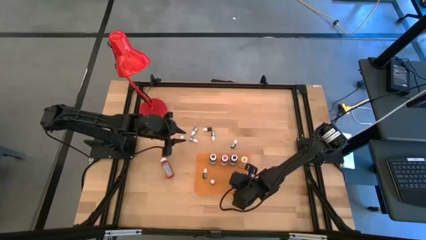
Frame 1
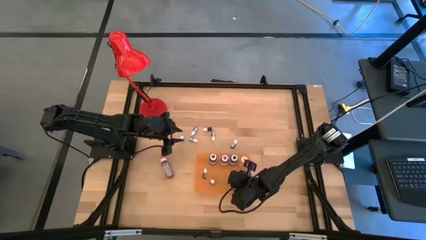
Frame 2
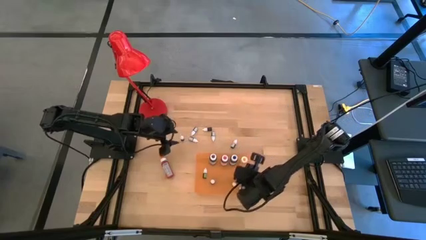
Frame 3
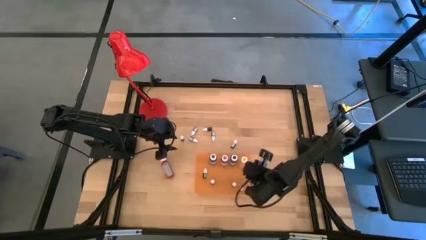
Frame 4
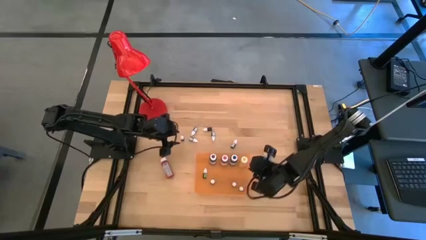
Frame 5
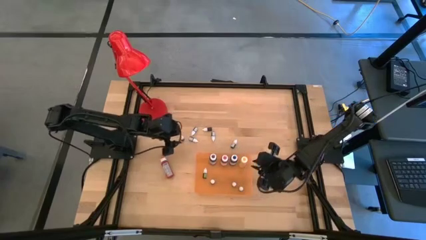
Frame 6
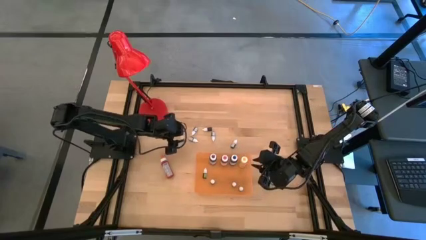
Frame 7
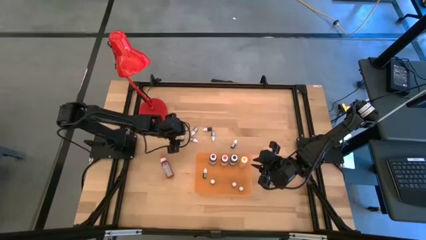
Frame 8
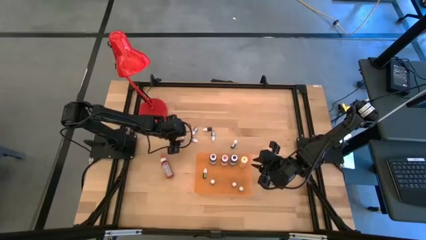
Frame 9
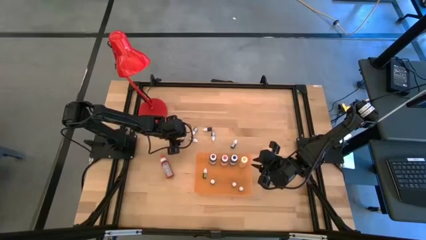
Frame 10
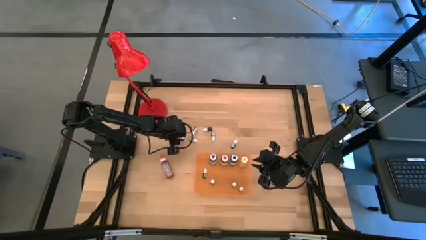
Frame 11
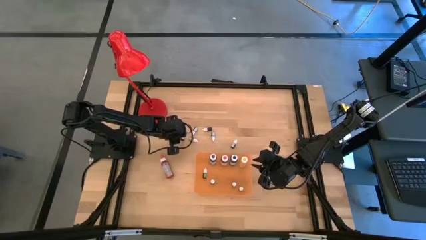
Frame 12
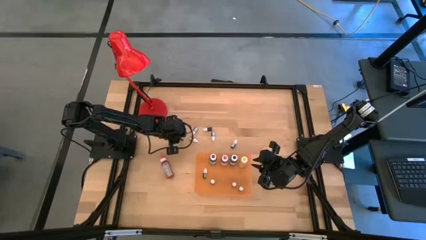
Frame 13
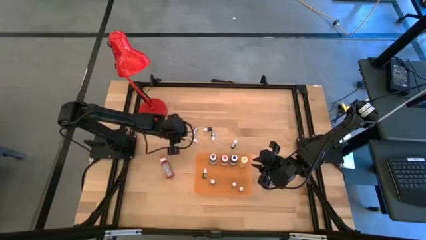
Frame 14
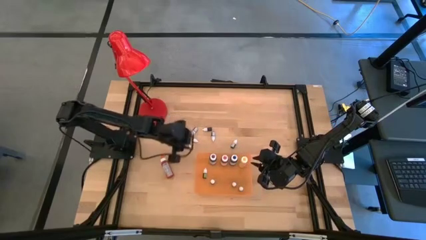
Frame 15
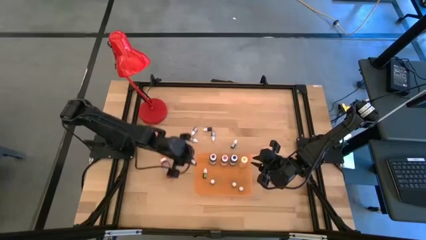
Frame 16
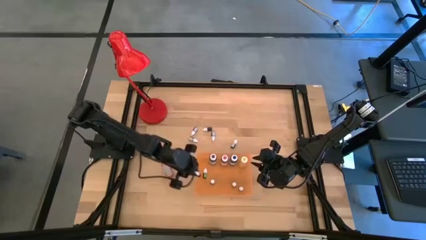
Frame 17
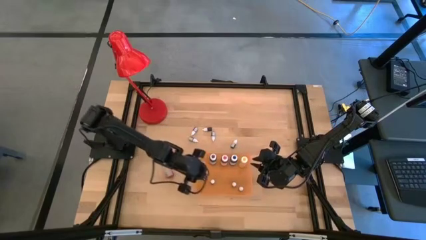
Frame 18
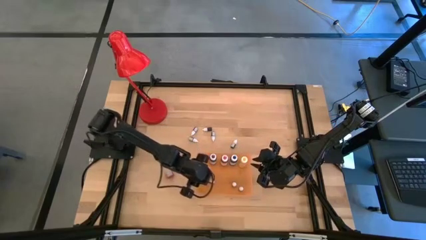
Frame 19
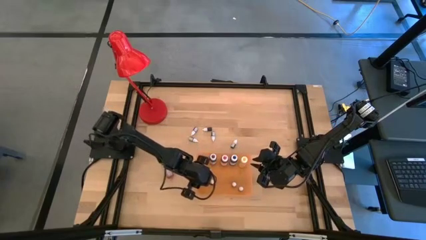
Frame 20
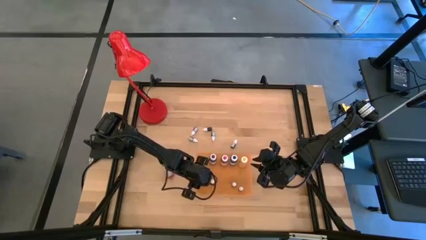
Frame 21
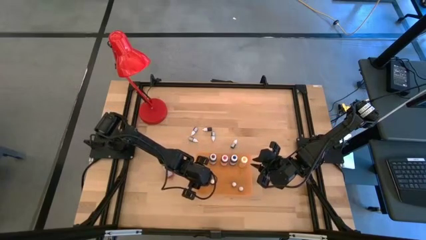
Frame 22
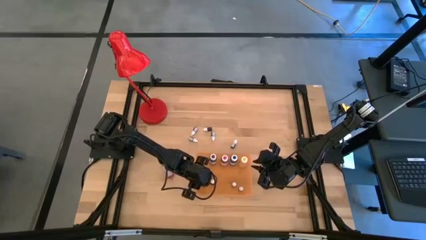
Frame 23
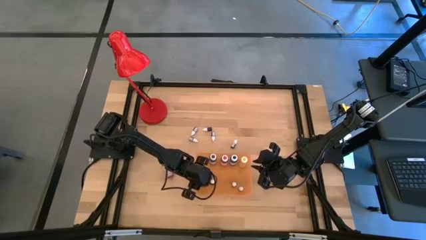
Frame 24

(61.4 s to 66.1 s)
Task: Pick & Place food coloring
Put the left small red food coloring bottle into the orange bin

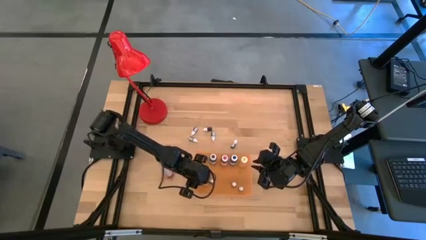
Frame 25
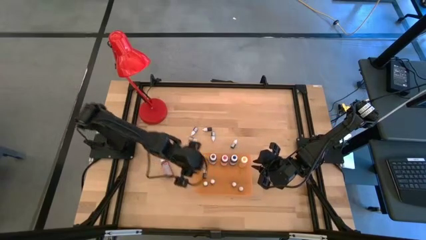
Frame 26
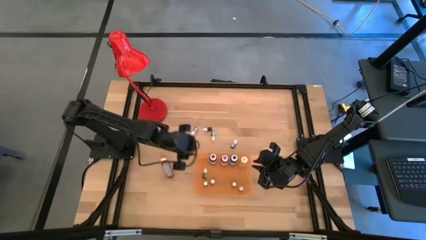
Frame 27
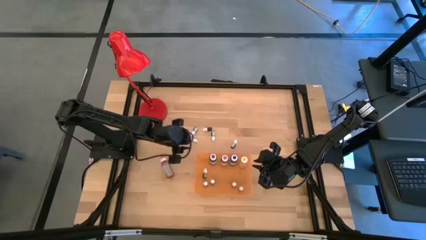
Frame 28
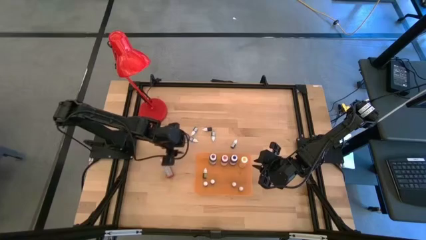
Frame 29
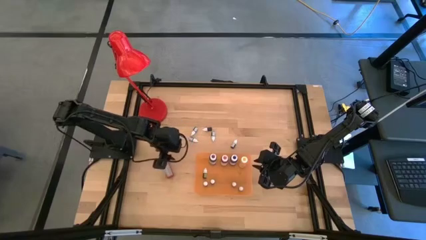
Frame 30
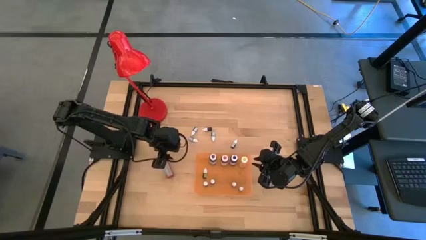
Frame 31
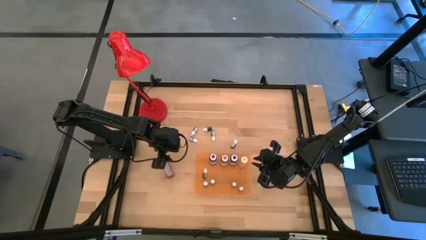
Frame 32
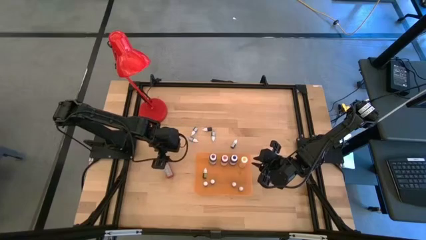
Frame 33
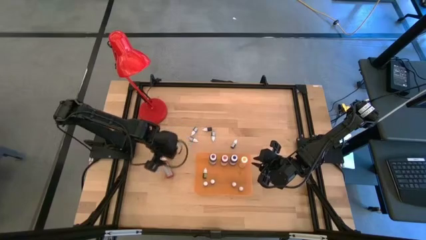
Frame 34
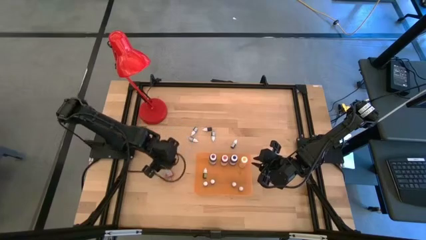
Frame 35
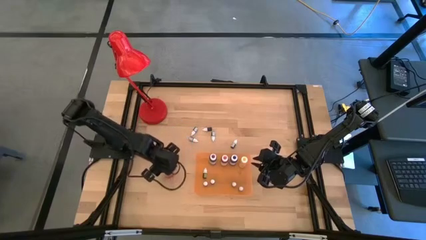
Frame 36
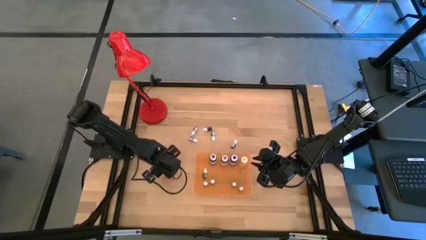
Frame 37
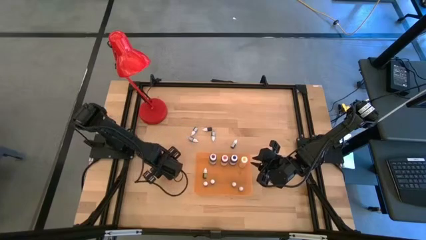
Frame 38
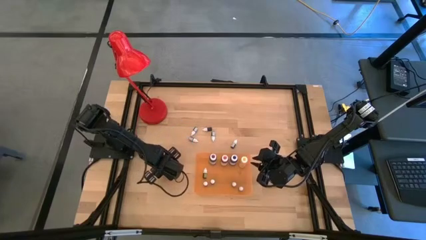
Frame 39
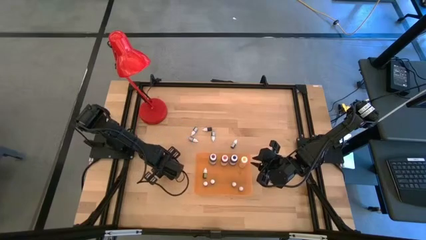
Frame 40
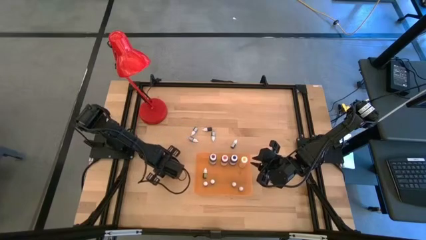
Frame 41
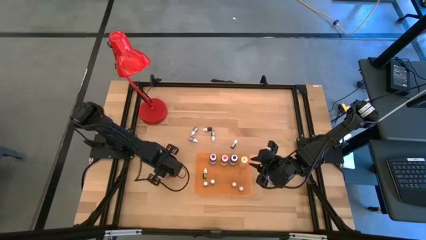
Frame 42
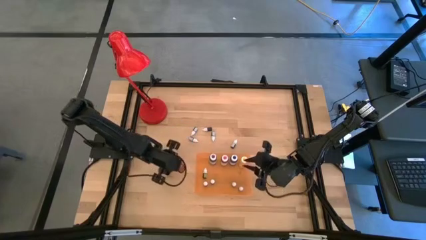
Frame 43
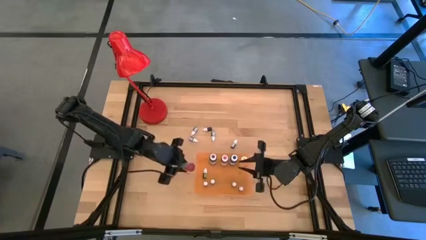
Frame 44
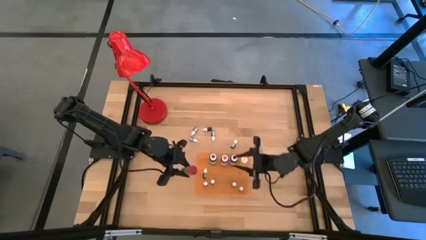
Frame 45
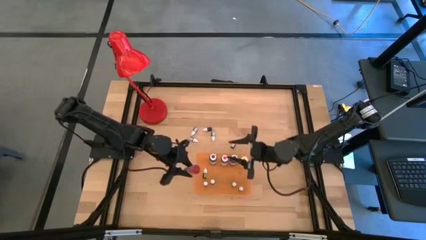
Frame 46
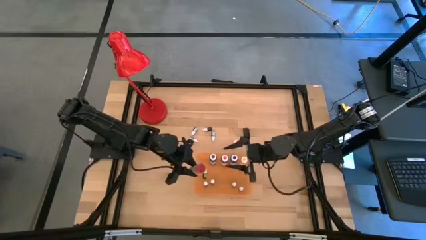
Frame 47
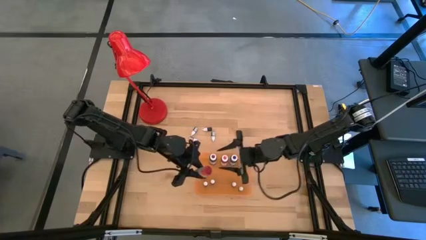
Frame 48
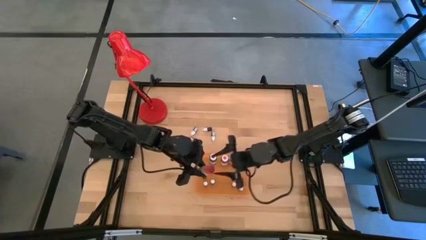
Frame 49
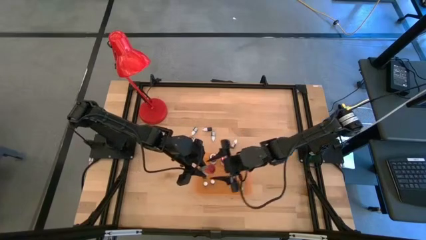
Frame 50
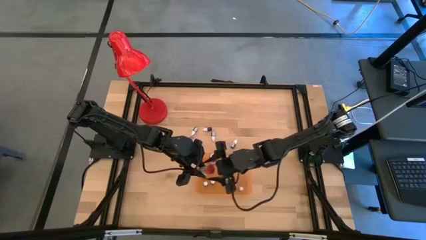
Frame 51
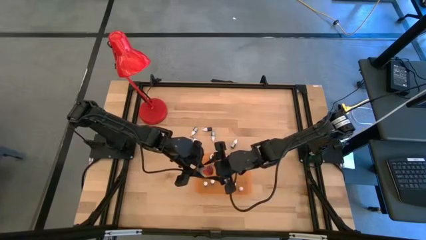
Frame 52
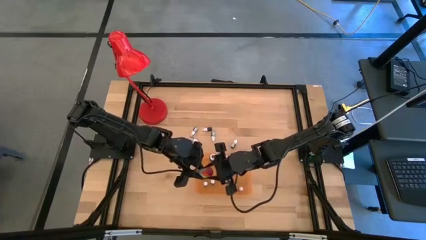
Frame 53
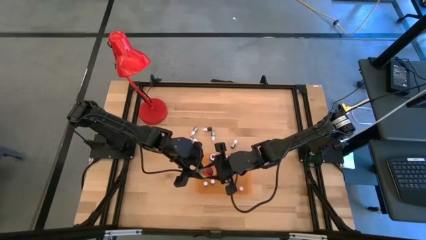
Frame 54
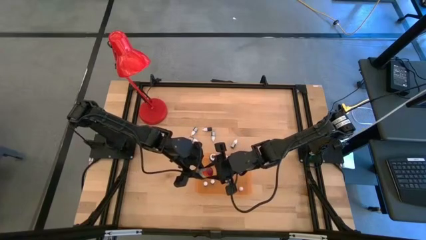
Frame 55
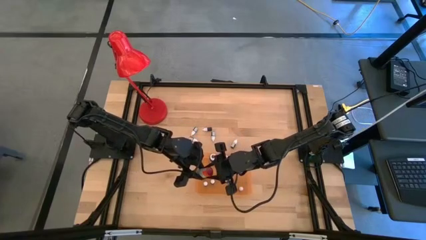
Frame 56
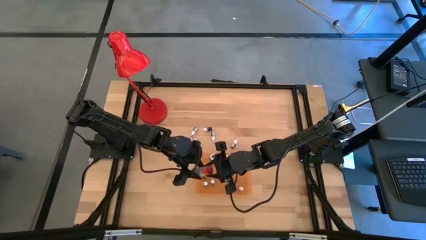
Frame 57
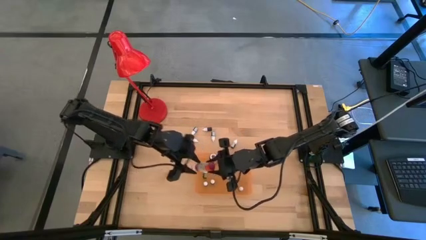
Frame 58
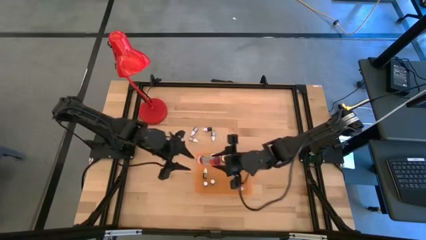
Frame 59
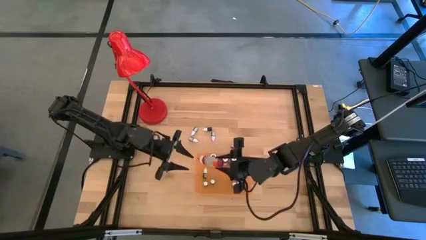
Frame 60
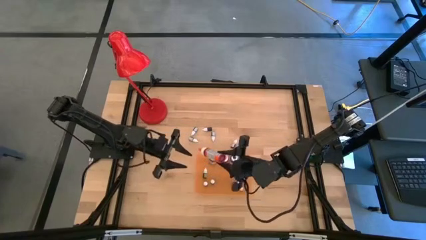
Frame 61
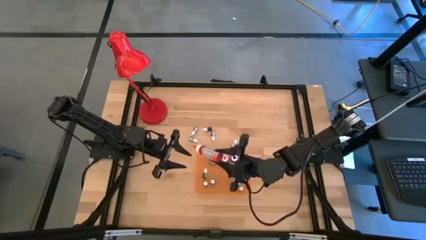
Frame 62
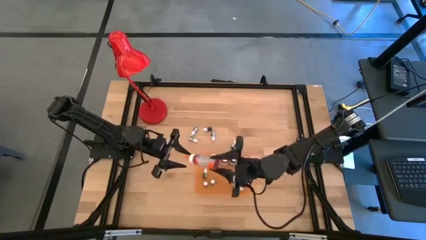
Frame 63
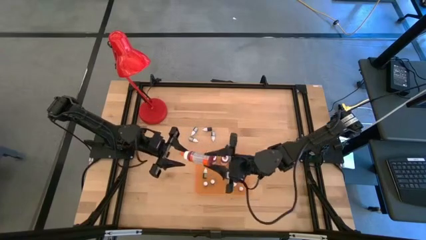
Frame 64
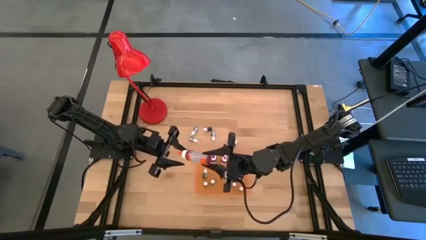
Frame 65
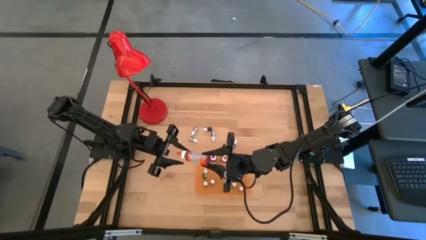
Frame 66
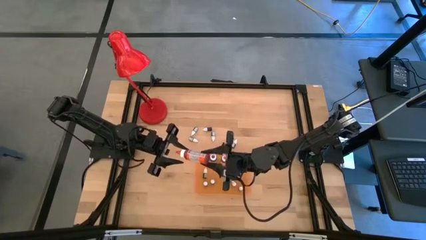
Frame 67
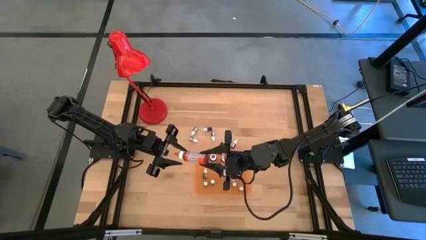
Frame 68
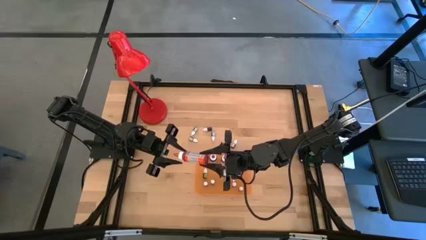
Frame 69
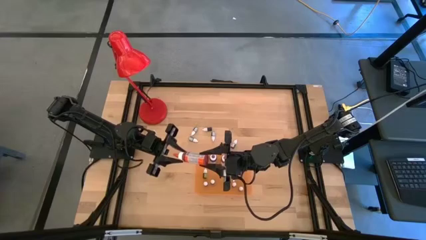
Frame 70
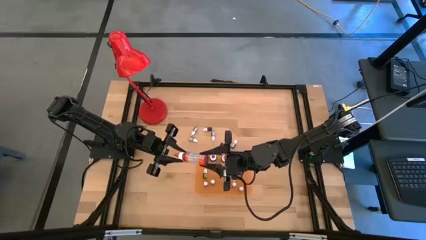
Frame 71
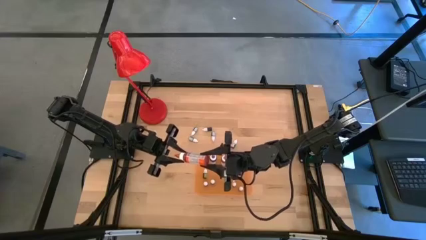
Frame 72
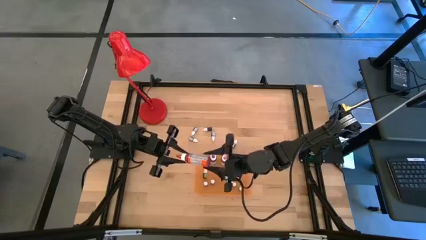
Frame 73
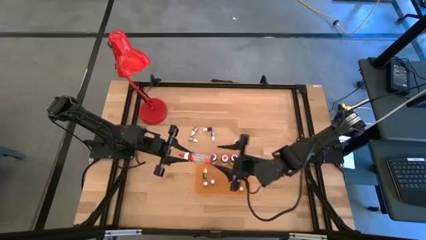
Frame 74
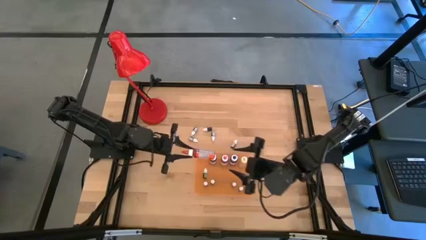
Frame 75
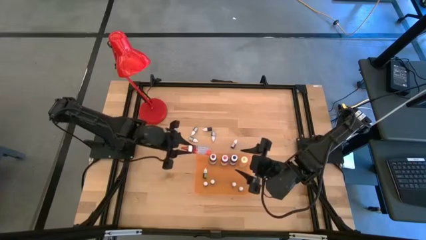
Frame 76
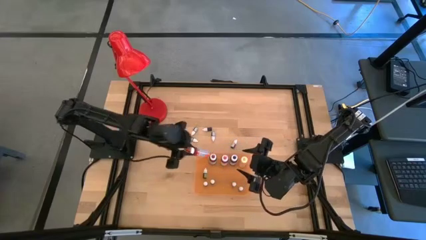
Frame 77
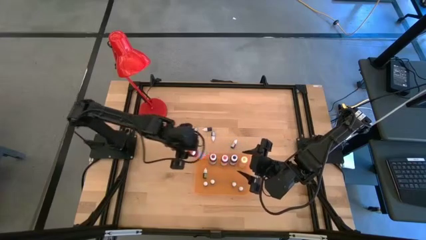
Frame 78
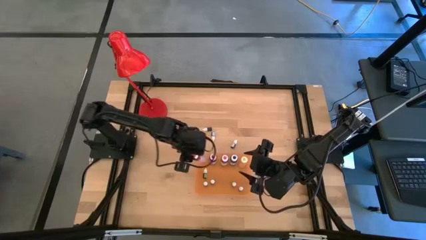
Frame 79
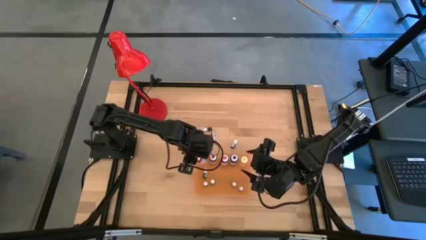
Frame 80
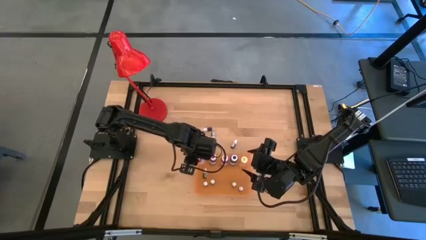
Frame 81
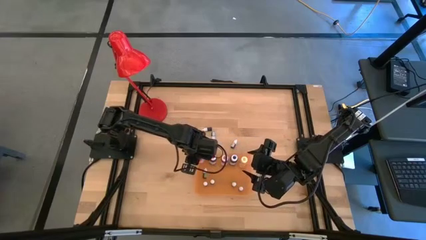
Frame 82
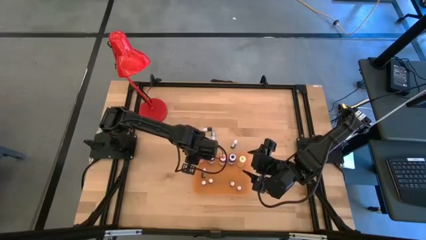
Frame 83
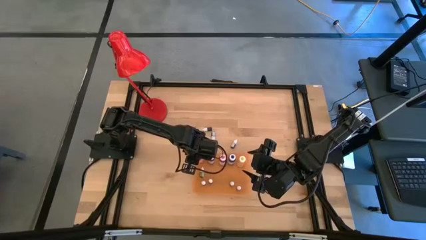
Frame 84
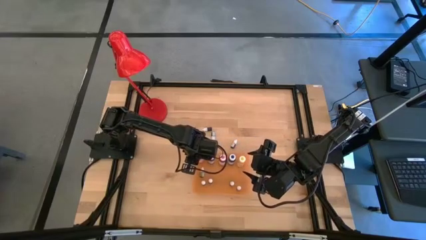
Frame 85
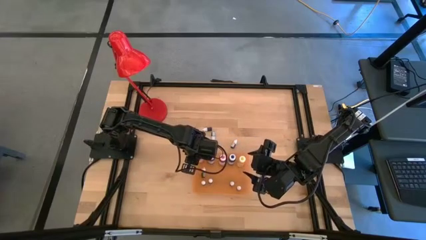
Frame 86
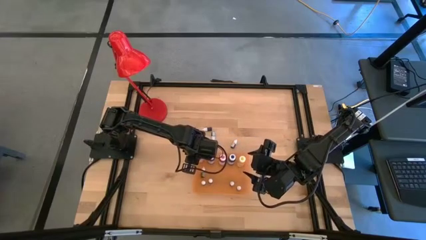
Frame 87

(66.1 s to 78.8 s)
Put the big orange food coloring bottle into the orange bin
